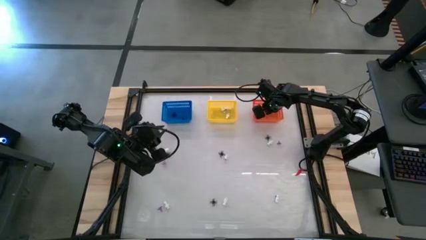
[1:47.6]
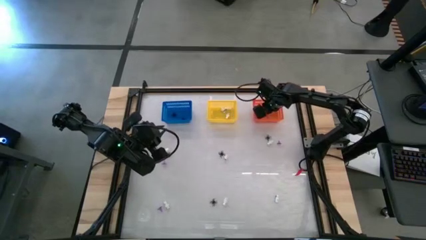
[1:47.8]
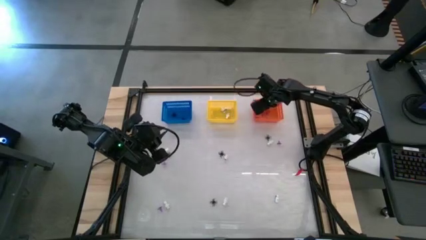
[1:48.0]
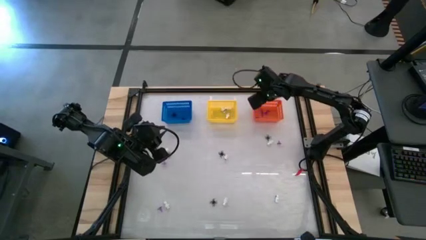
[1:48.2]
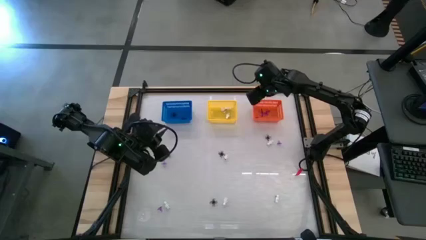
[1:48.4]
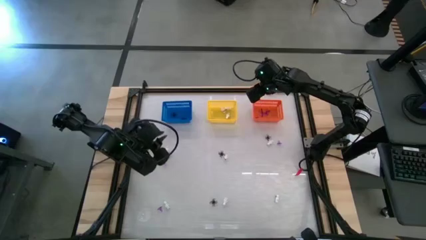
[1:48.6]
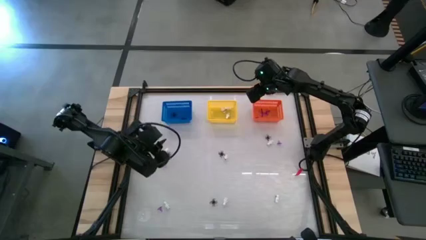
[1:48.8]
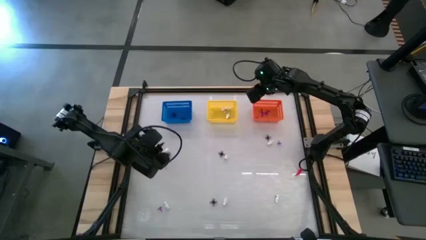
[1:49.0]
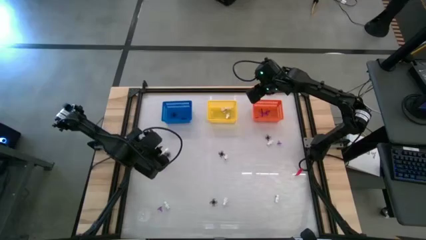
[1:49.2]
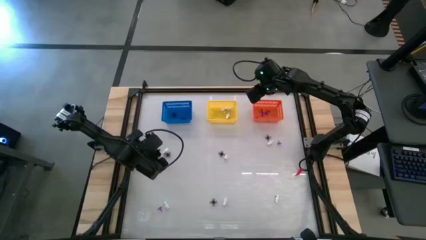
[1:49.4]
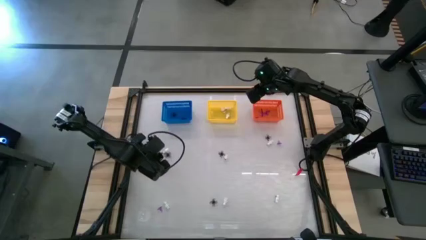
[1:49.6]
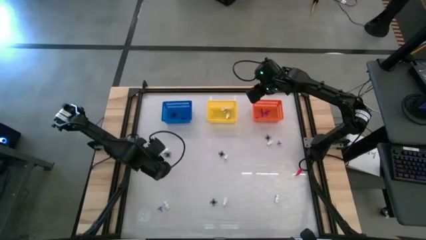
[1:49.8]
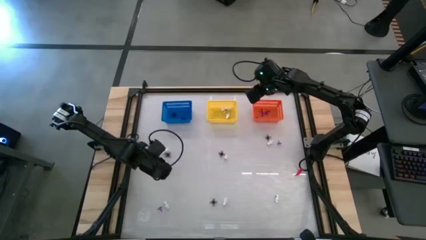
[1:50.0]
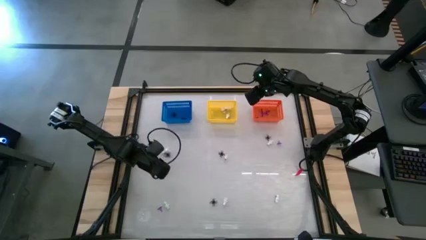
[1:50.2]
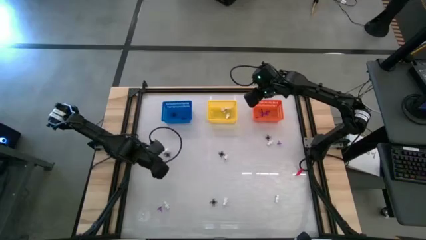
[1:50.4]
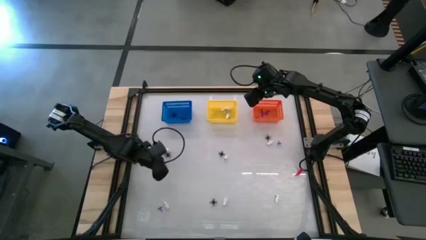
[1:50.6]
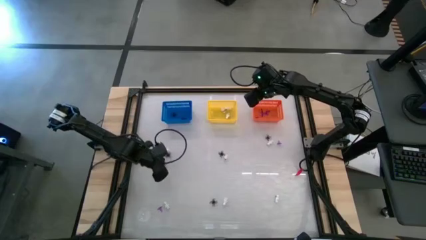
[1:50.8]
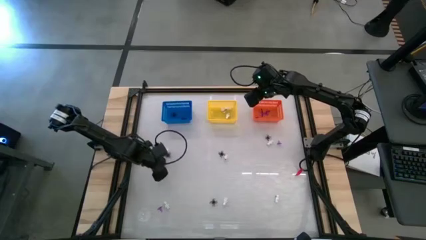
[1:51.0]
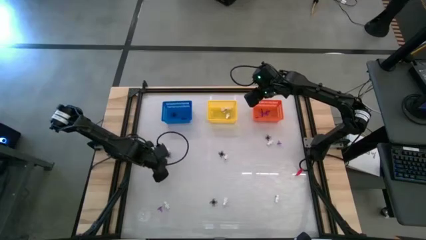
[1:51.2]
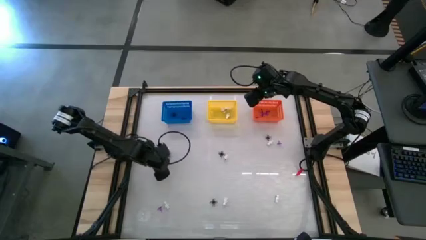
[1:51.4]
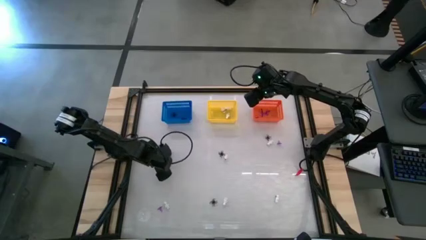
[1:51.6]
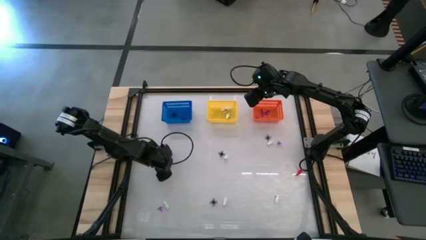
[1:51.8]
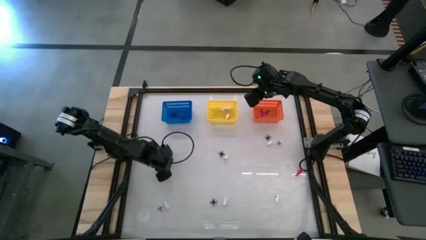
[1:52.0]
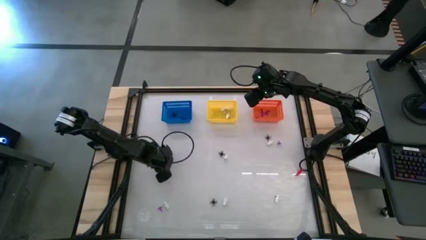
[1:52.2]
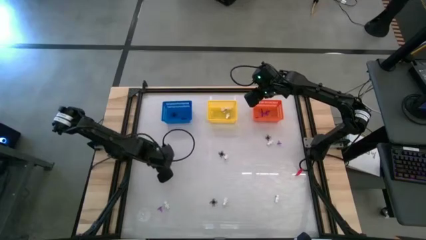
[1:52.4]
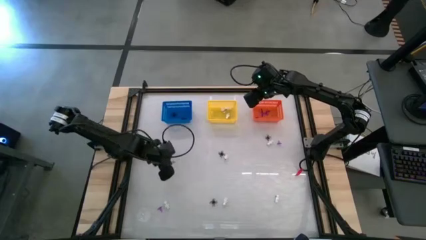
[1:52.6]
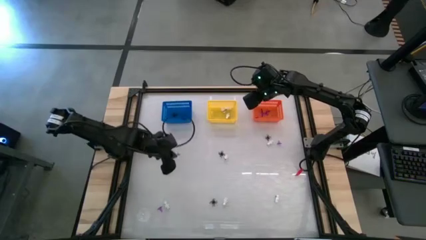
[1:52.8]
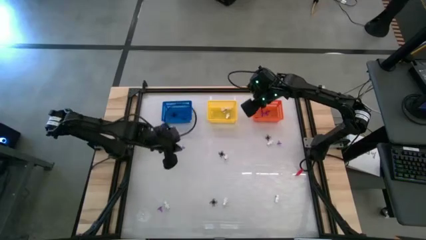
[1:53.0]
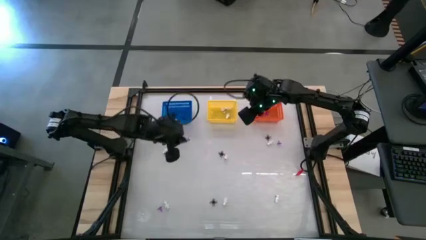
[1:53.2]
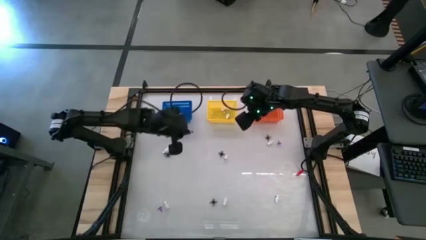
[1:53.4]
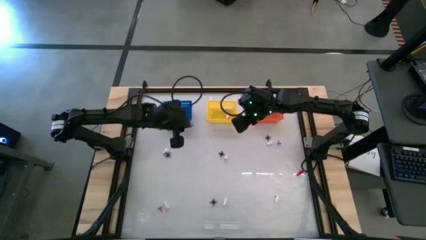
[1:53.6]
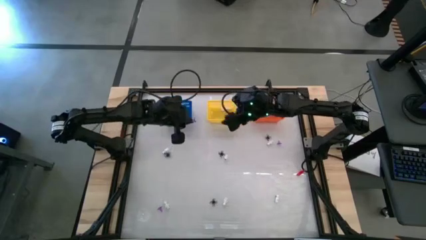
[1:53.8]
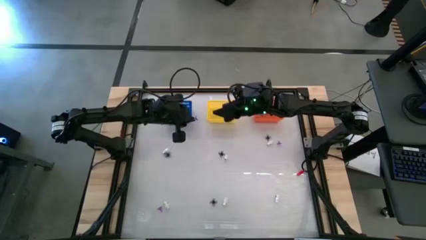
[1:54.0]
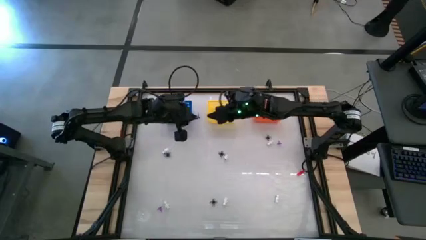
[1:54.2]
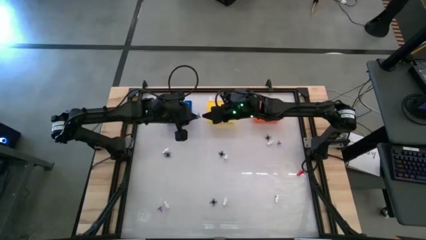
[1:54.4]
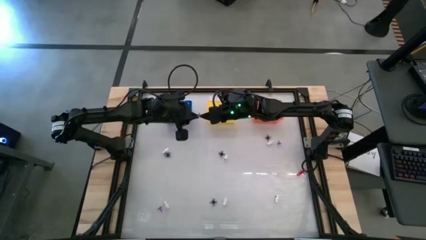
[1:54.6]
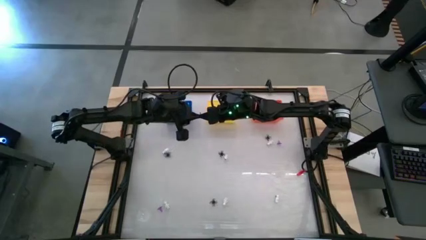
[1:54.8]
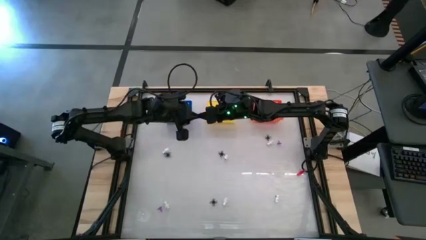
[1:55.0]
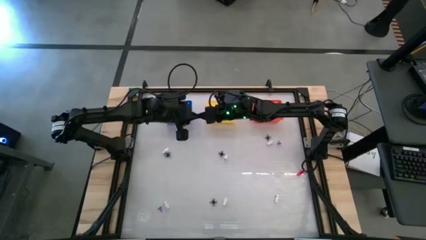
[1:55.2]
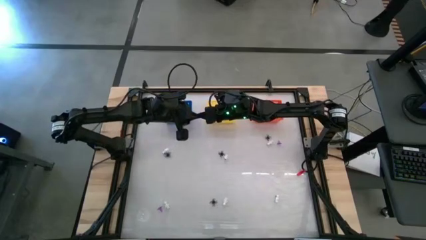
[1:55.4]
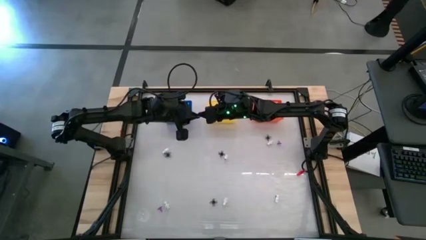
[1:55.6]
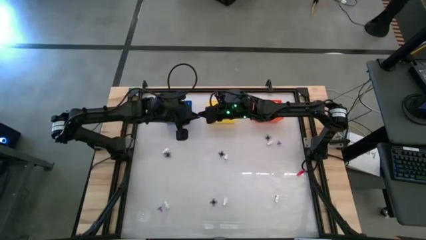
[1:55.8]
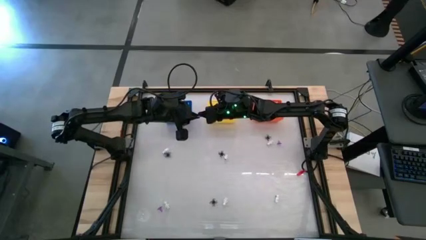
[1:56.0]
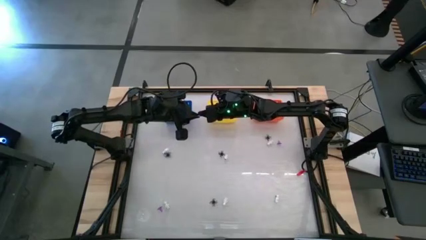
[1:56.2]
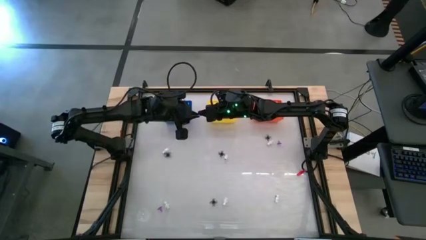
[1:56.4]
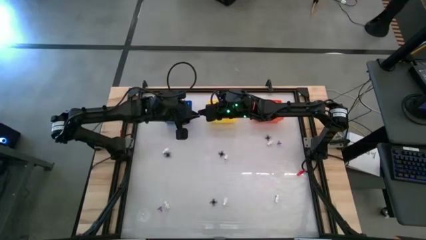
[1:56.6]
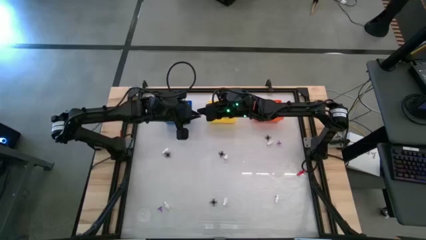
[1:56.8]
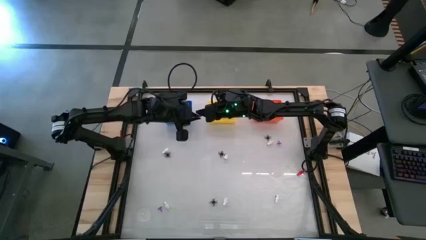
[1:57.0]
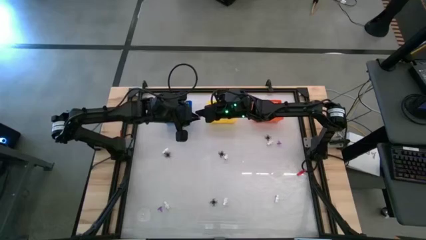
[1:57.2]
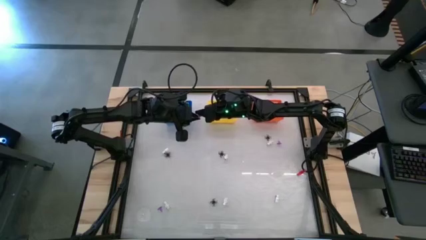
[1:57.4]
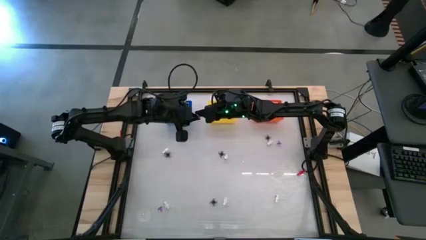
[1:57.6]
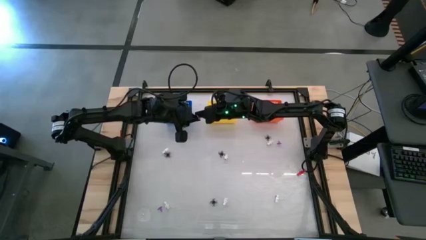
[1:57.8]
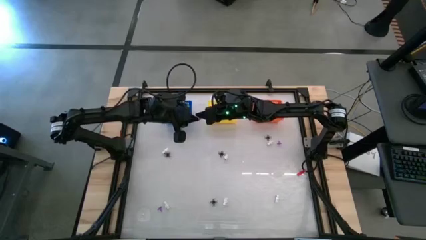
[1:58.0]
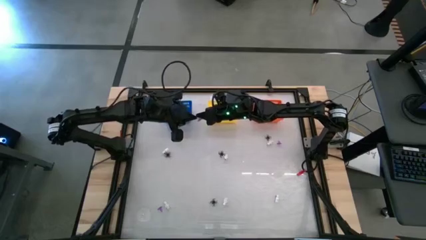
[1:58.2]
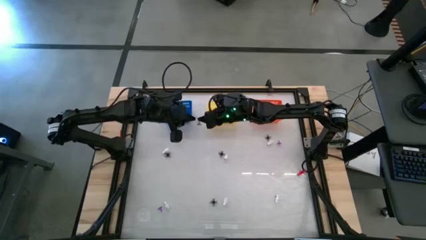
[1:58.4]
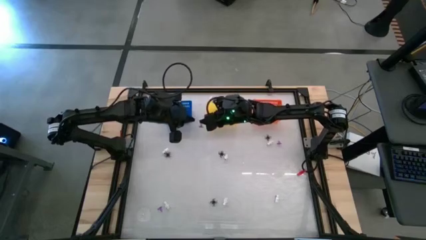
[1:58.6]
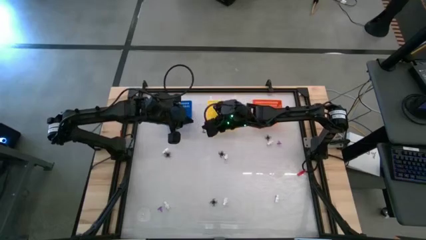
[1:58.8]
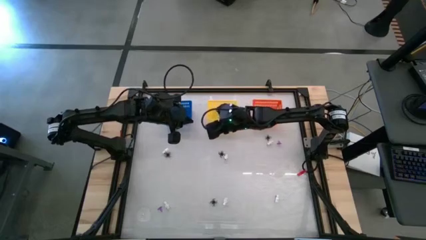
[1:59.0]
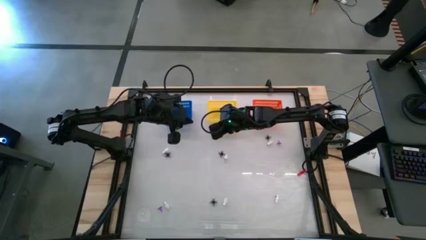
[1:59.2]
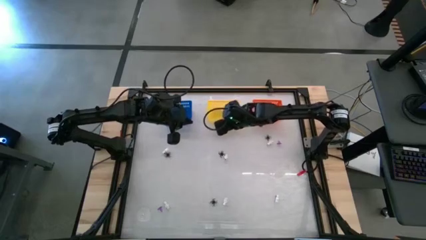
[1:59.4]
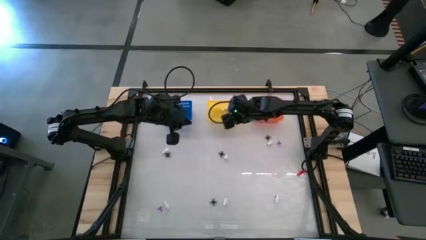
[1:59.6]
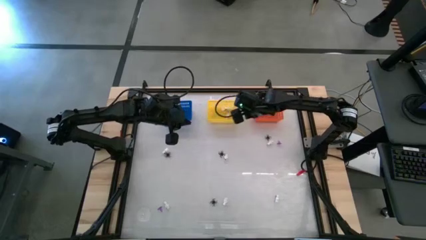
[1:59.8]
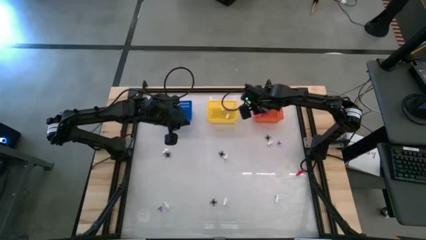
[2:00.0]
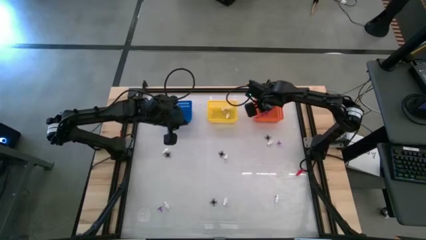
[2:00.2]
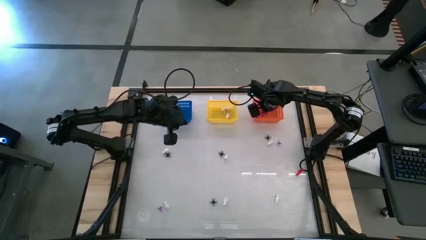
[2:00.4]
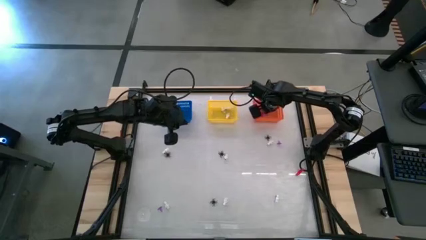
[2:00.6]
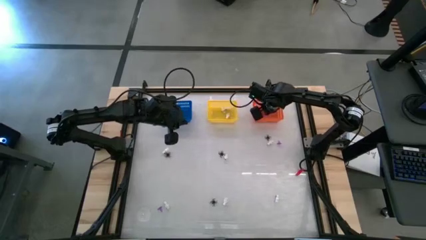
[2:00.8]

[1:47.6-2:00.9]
Task: Sort Halloween decoration
Put the purple witch hat toy into the orange basket

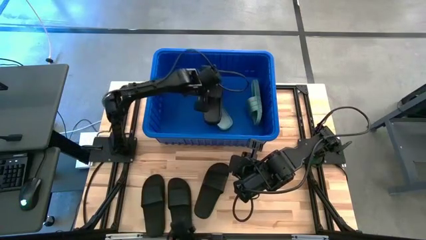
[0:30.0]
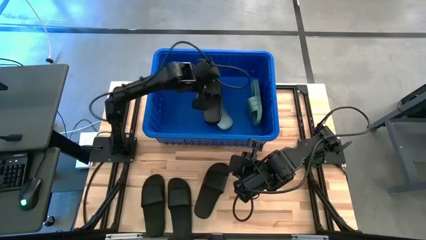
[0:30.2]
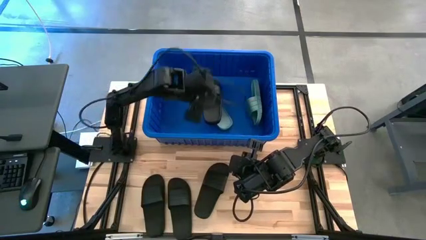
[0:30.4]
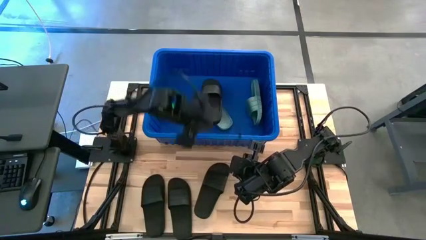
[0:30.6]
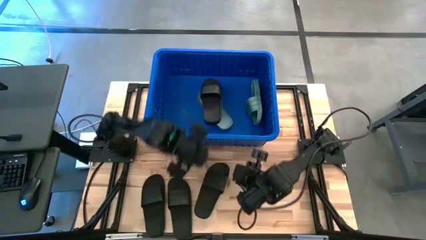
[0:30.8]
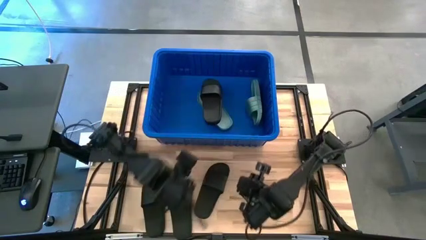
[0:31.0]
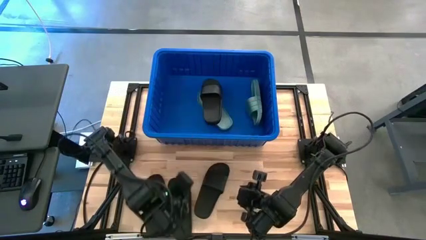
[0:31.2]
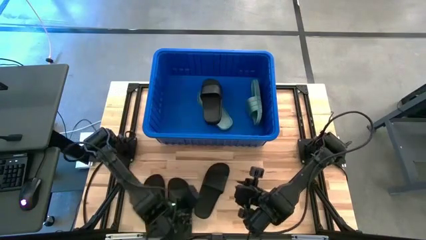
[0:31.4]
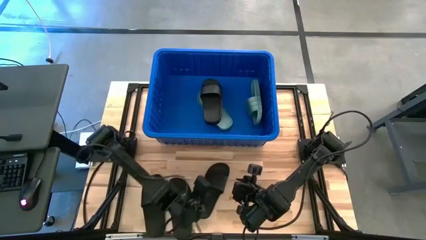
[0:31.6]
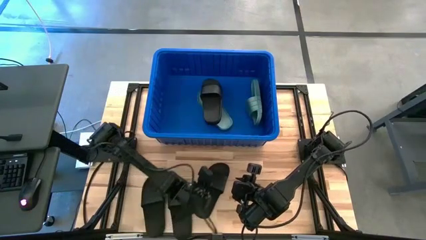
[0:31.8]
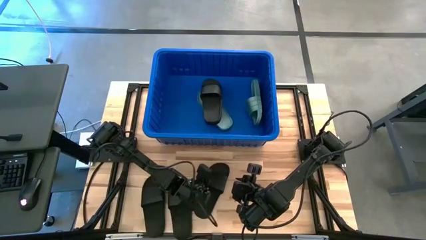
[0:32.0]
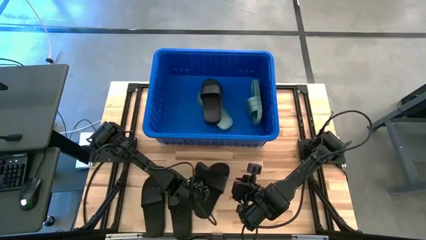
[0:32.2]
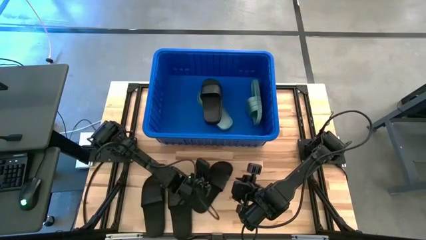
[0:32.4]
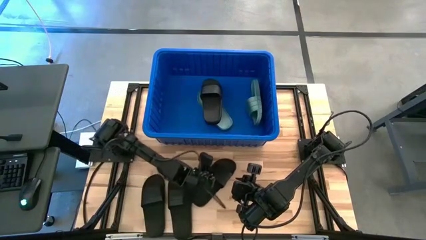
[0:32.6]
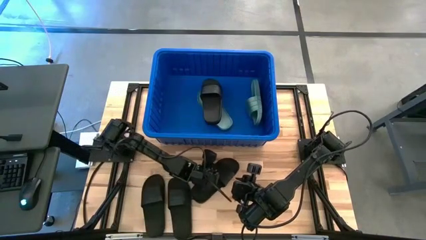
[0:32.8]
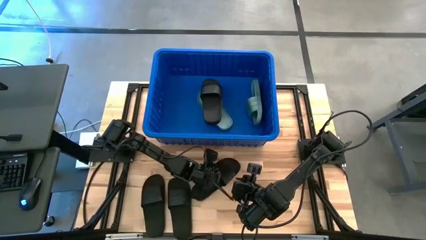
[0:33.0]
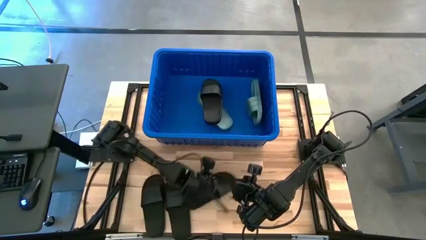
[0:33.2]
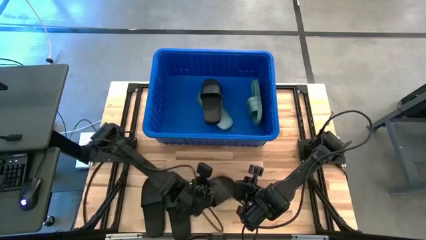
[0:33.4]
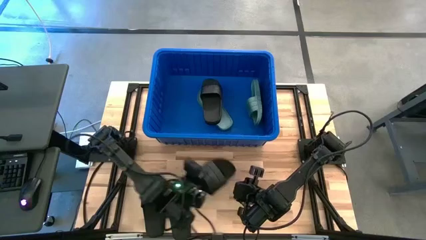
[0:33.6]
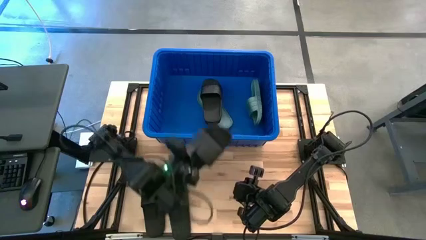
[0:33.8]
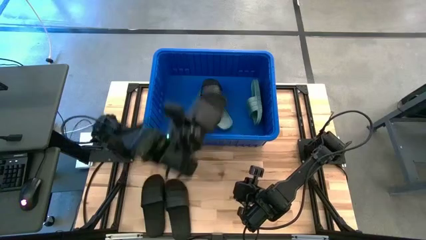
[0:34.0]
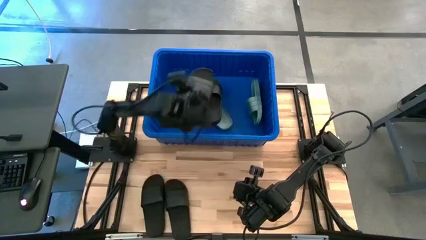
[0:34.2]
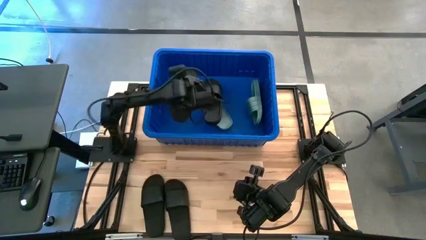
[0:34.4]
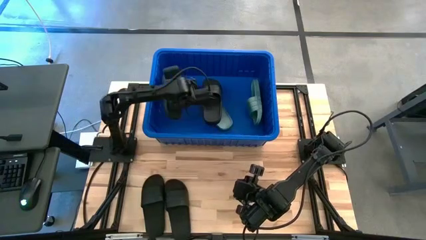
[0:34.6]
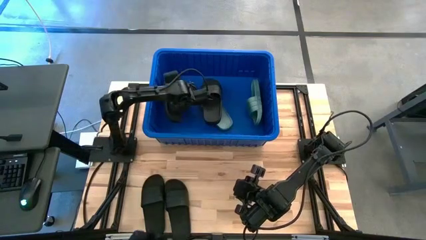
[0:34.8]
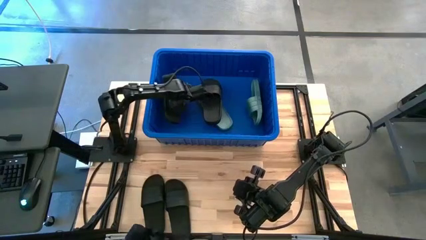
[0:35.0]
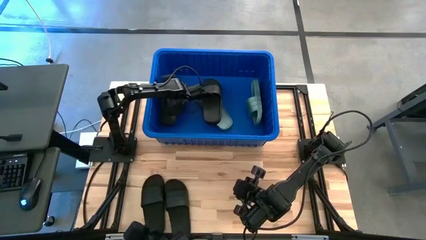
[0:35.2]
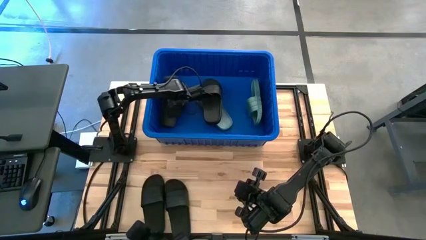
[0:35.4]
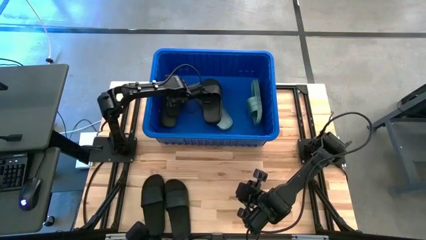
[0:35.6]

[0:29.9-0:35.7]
Task: Pick and place slides into bin
Put the black slide into the blue bin
